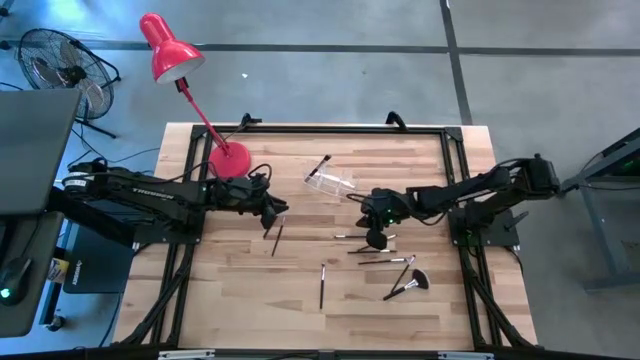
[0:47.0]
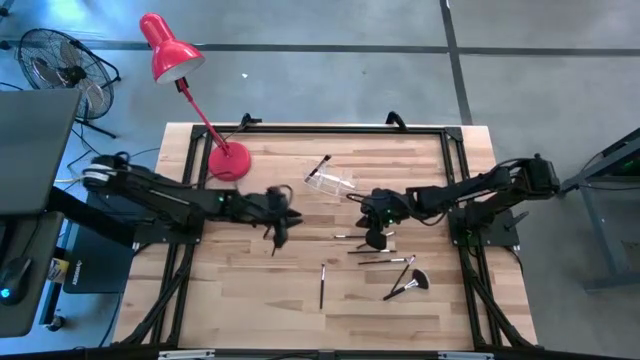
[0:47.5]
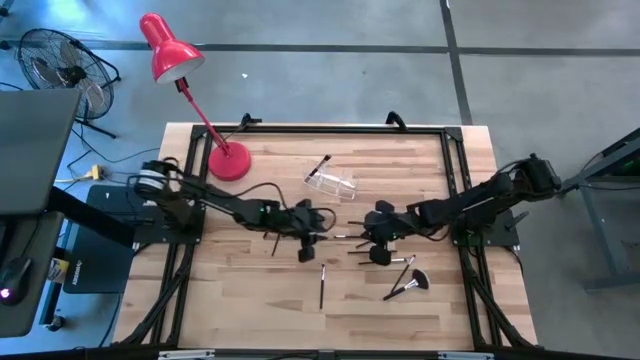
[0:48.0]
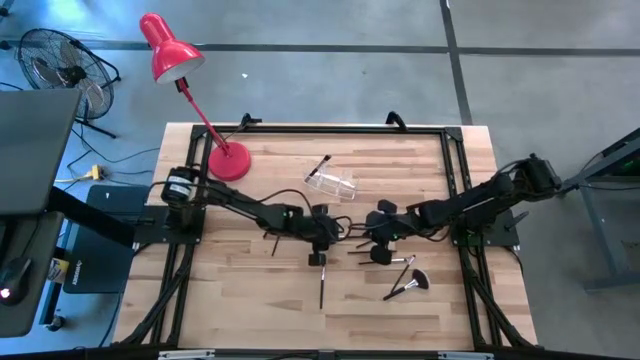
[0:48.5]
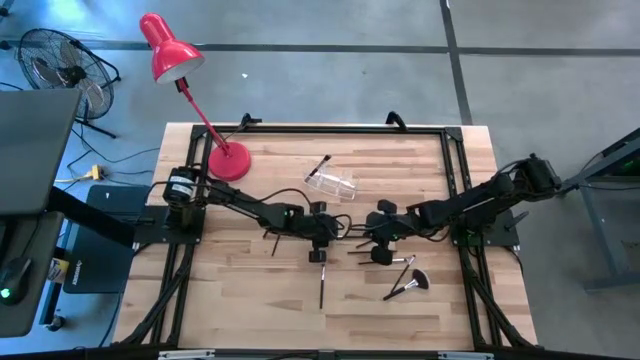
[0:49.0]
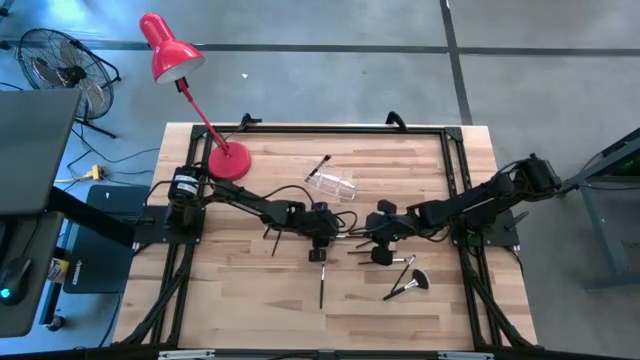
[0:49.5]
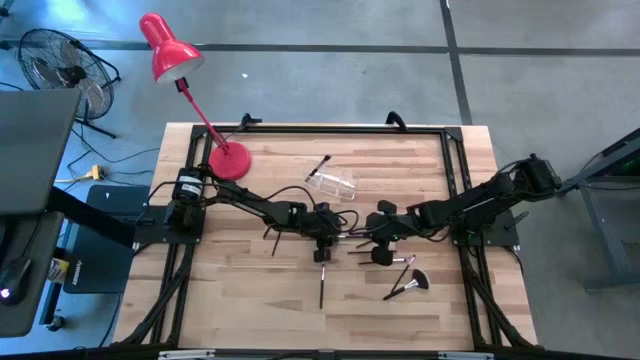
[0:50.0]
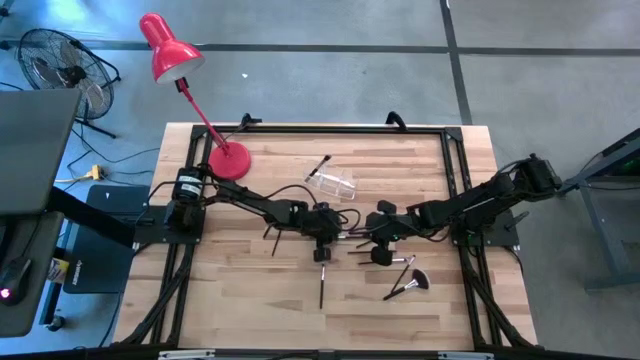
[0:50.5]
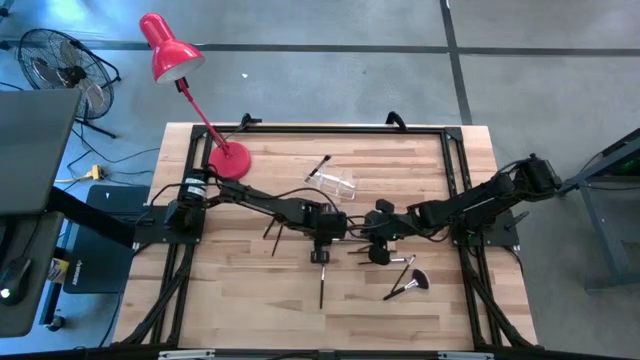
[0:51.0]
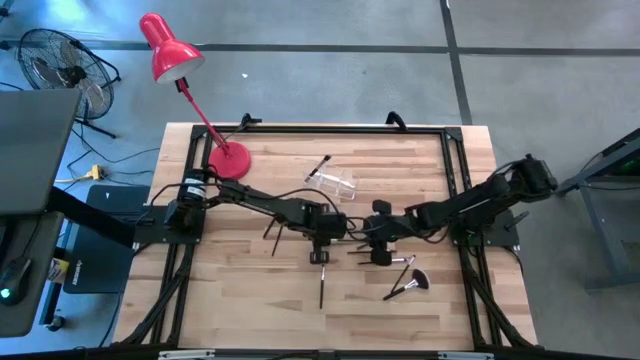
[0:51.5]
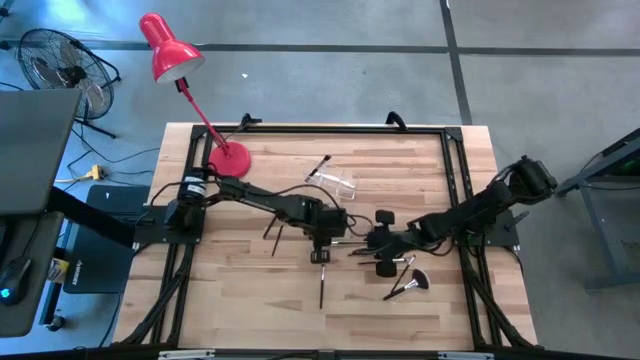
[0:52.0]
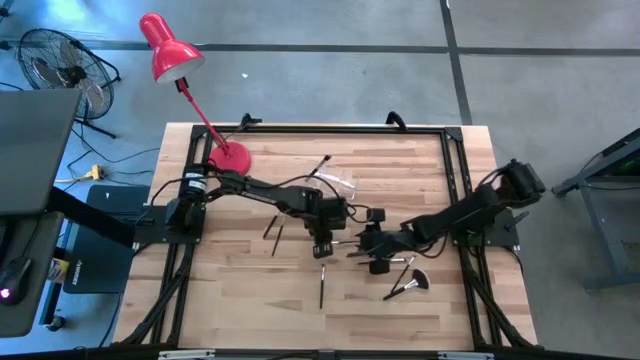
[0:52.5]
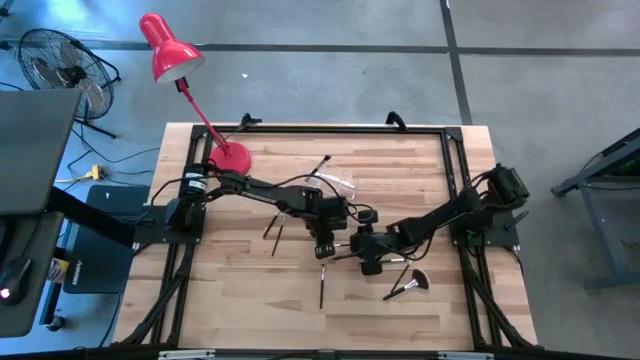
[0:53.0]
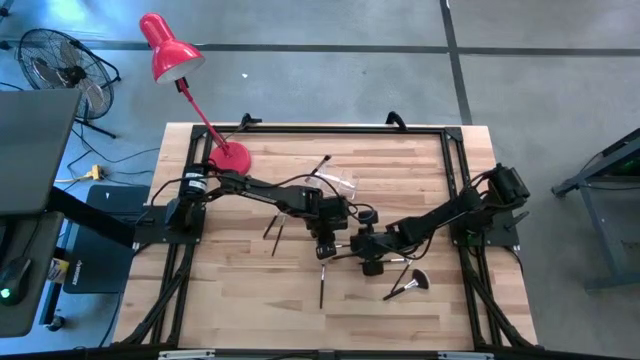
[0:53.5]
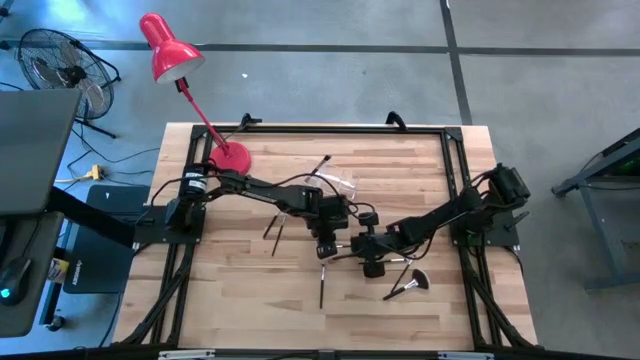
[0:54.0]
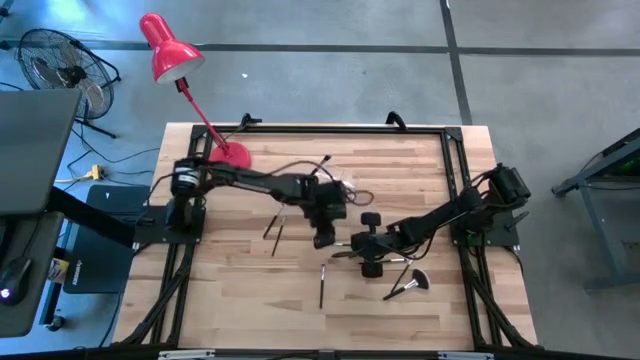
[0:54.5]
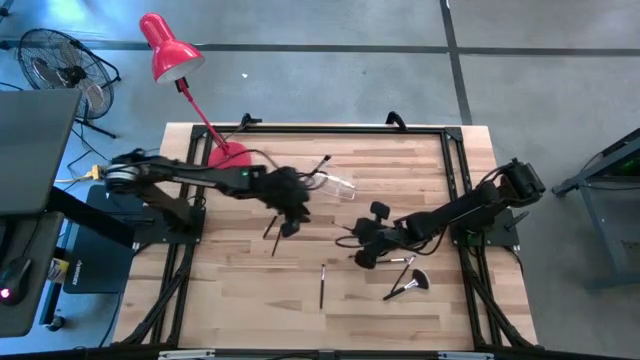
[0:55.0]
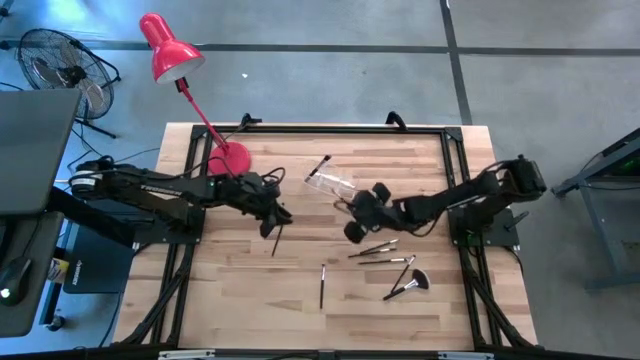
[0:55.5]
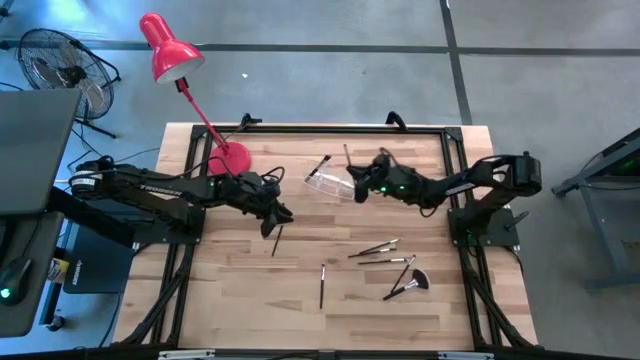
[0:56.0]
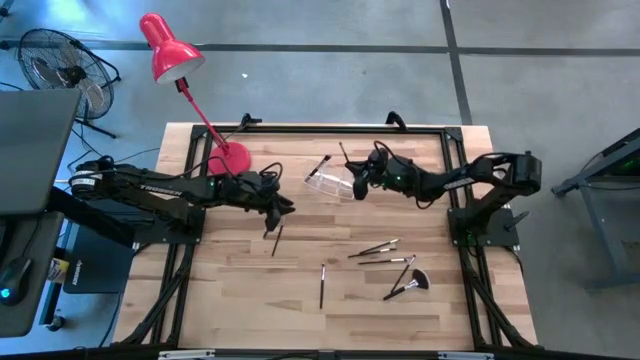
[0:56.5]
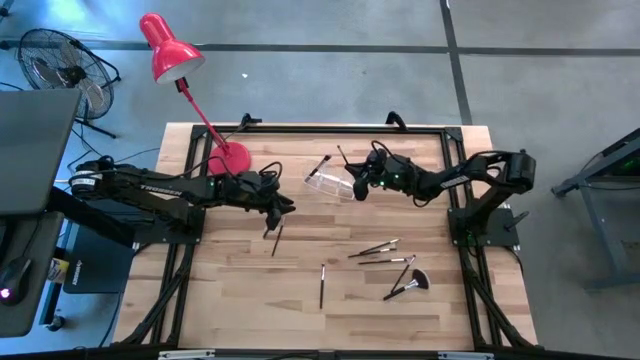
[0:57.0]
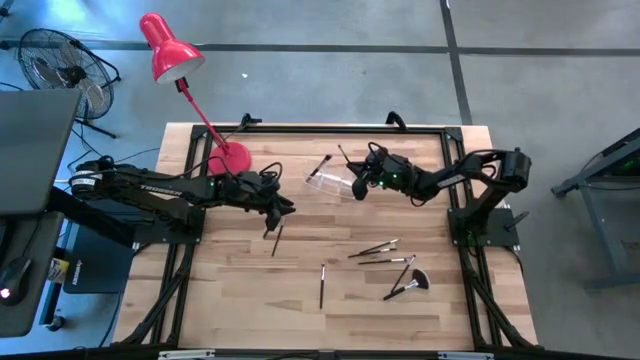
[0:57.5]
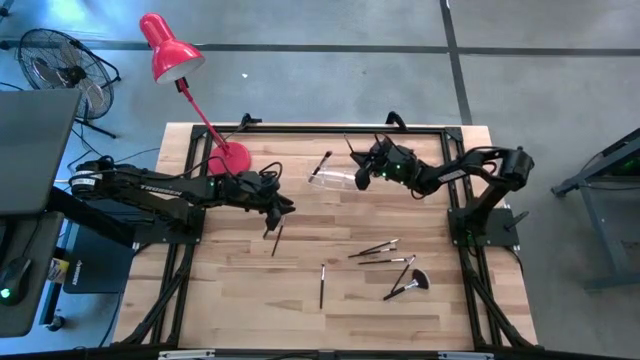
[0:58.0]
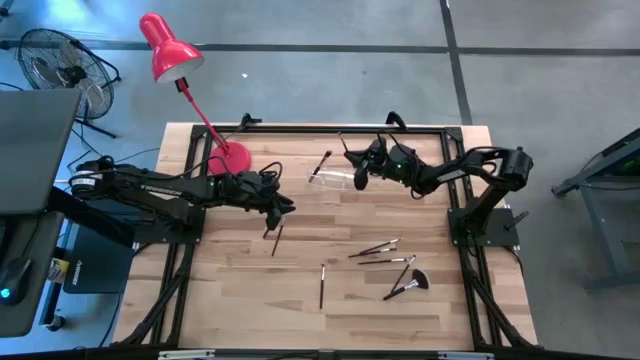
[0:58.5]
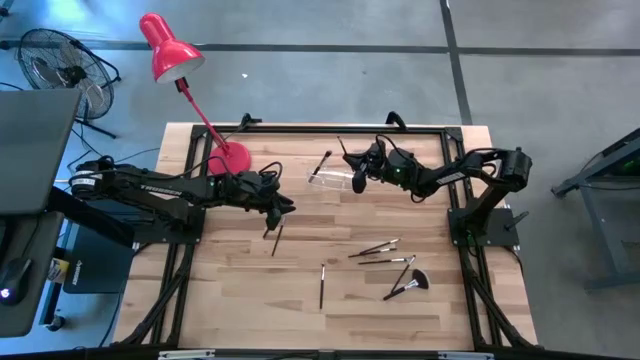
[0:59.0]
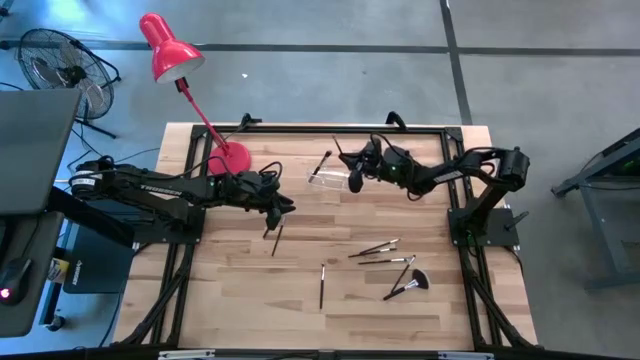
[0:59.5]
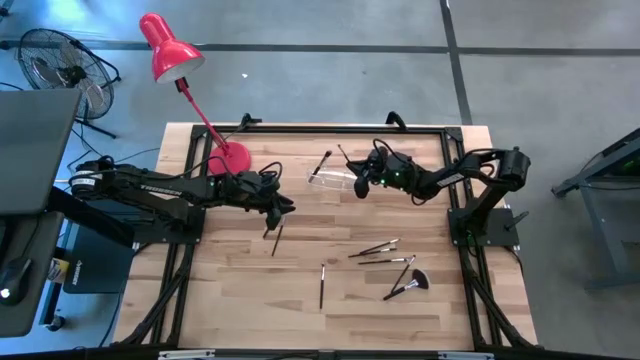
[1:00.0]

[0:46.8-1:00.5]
Task: Put items in baskets/containers
Put the eyeshadow brush into the transparent organizer

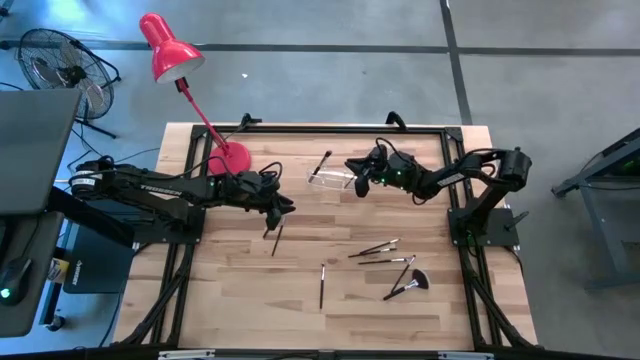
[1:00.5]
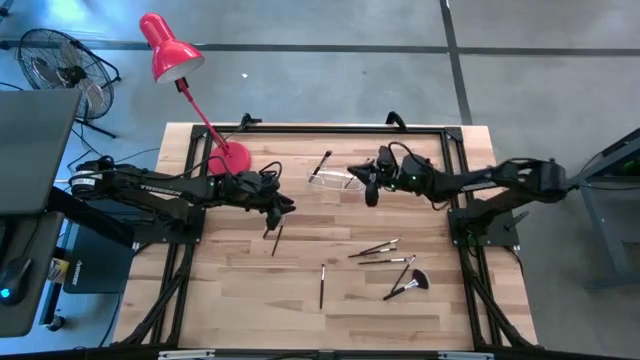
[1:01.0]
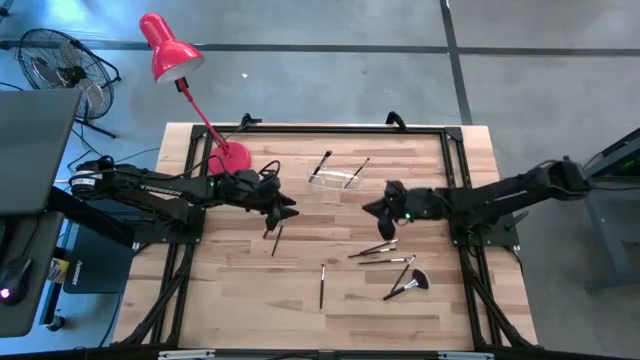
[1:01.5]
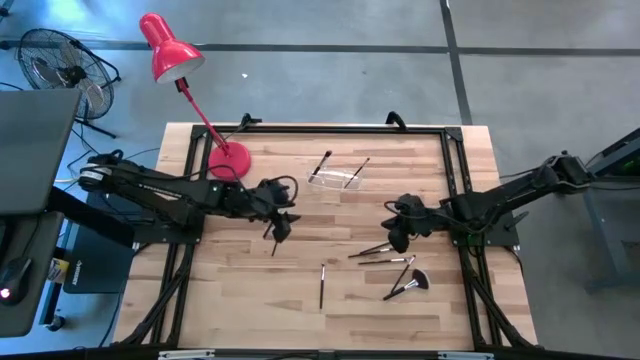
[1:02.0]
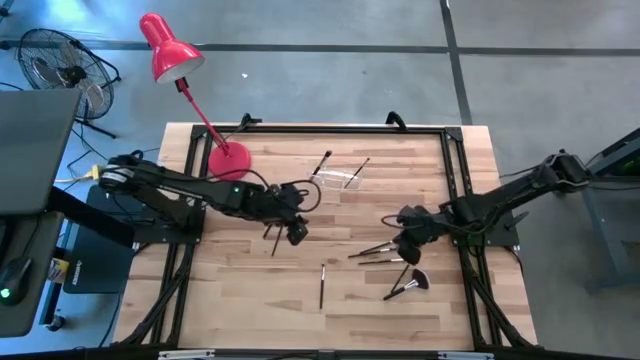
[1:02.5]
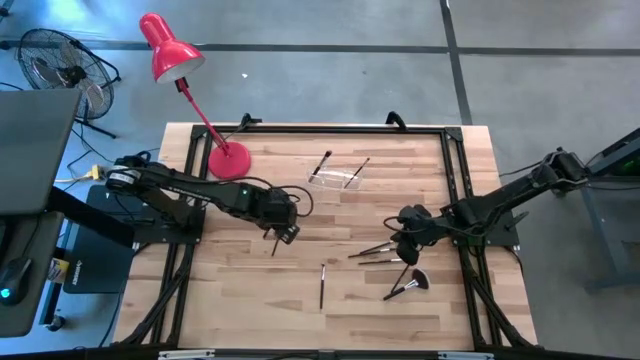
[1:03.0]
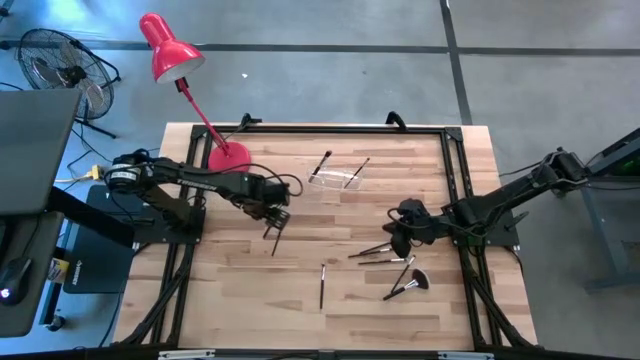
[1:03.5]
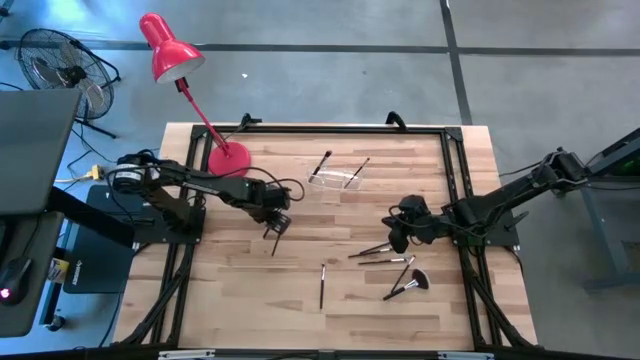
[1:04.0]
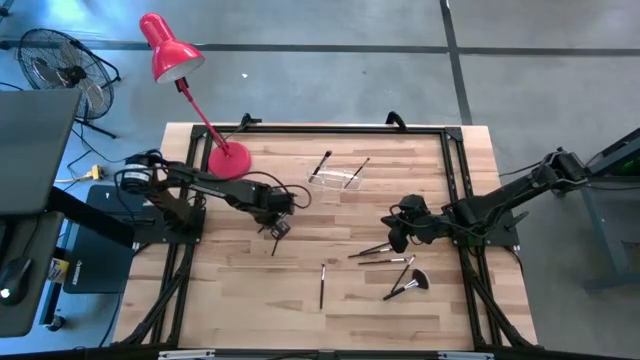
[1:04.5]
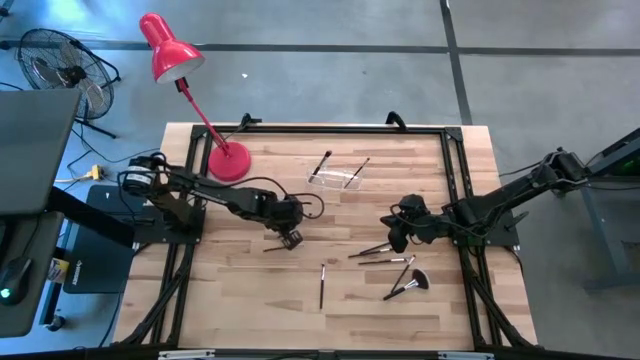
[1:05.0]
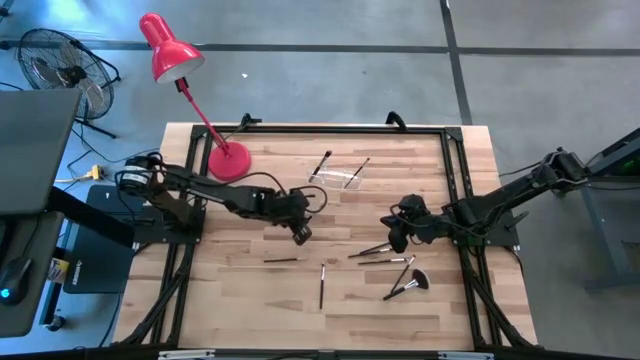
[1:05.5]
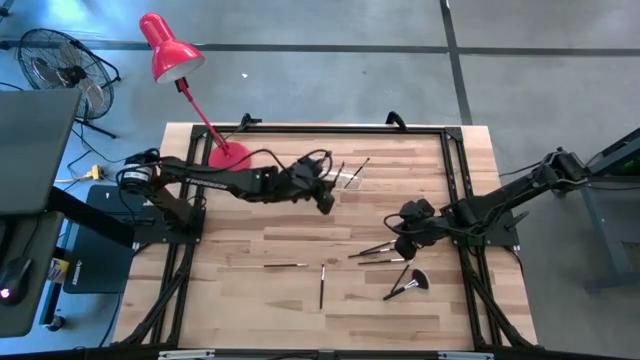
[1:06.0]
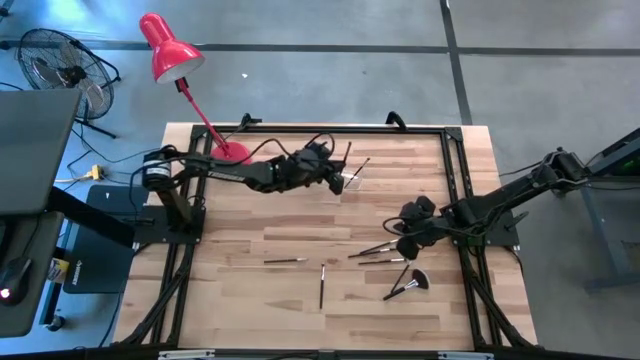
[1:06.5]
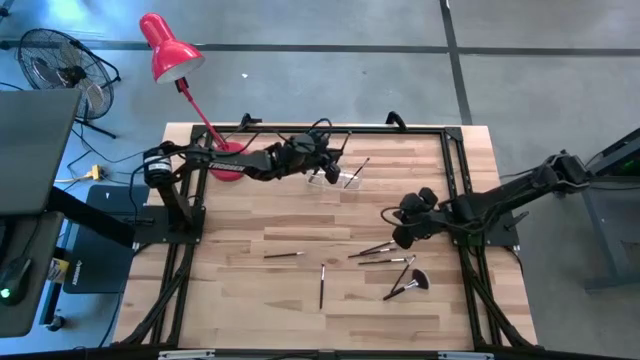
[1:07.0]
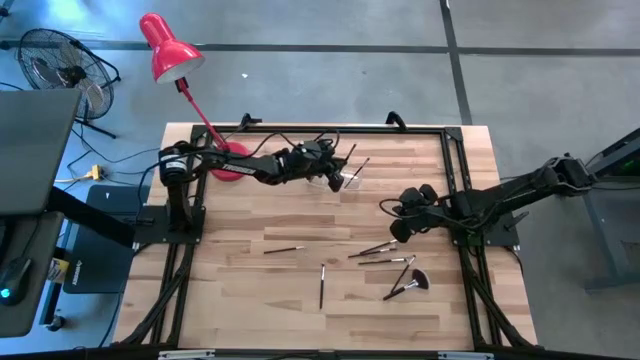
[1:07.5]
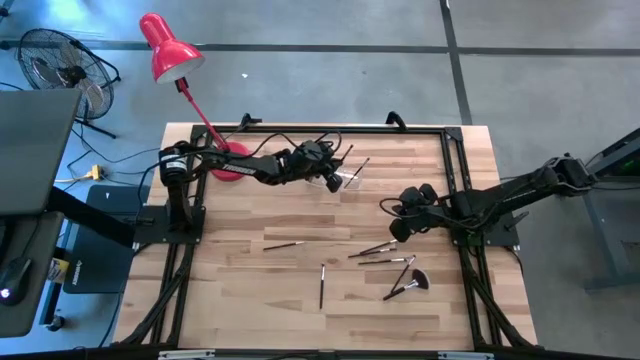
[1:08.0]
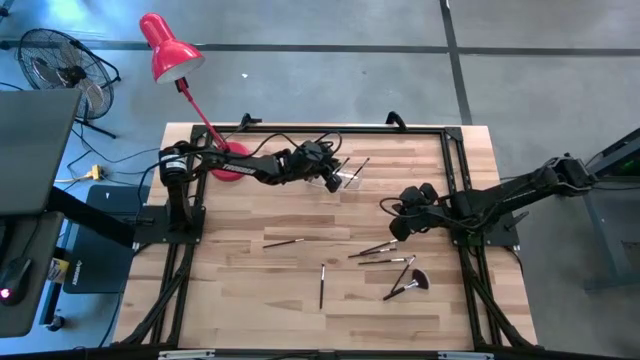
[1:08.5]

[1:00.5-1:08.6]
Put the eyeshadow brush into the transparent organizer
